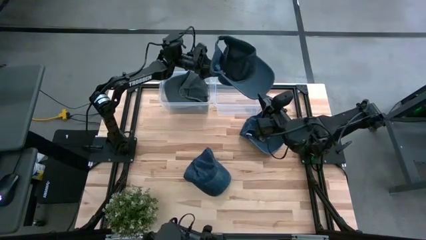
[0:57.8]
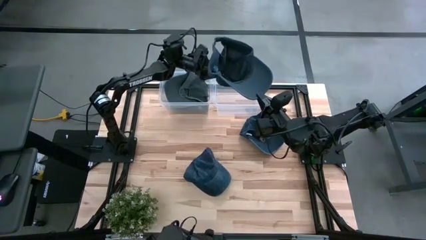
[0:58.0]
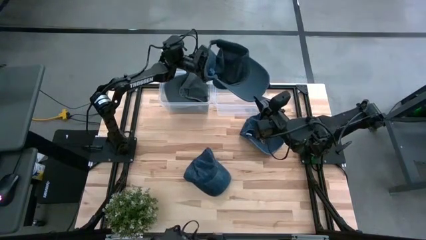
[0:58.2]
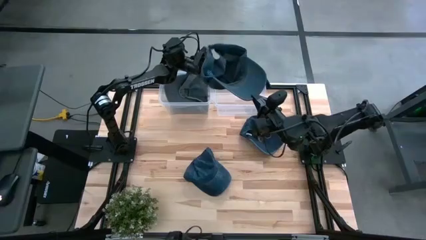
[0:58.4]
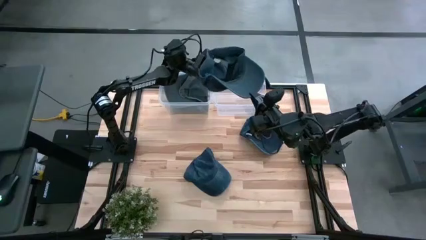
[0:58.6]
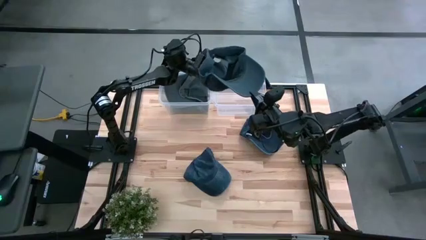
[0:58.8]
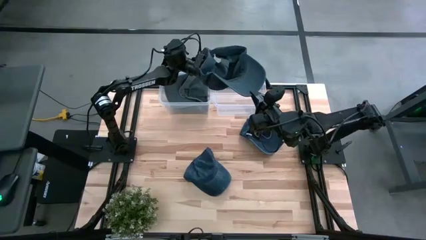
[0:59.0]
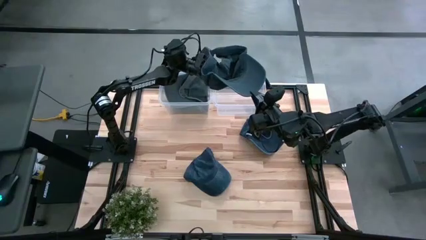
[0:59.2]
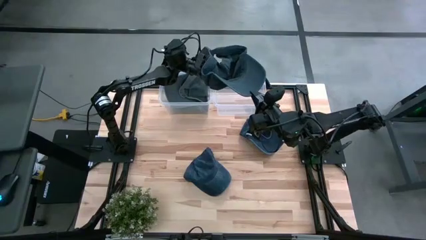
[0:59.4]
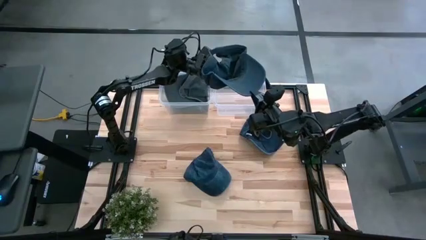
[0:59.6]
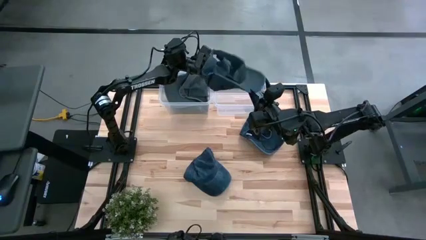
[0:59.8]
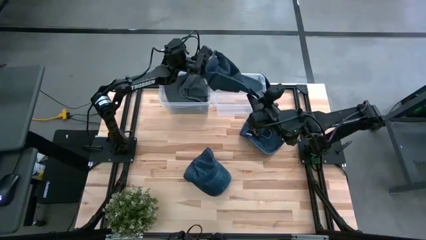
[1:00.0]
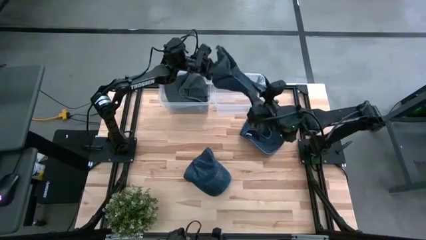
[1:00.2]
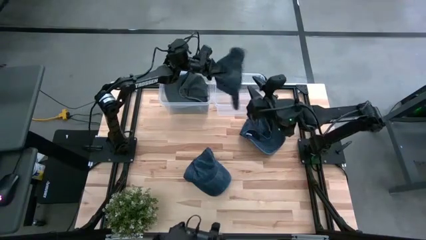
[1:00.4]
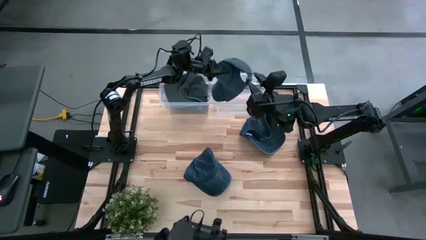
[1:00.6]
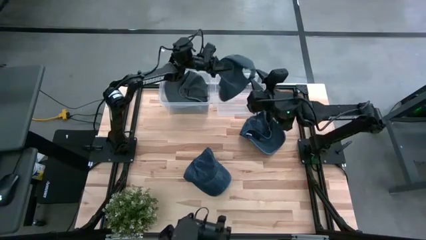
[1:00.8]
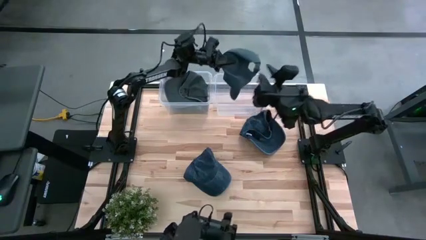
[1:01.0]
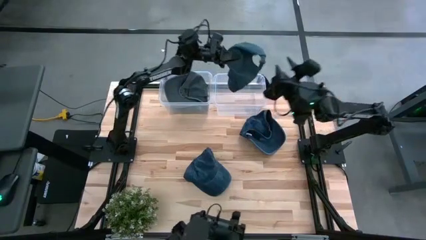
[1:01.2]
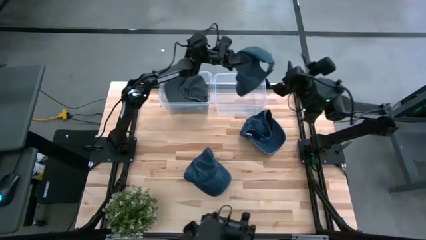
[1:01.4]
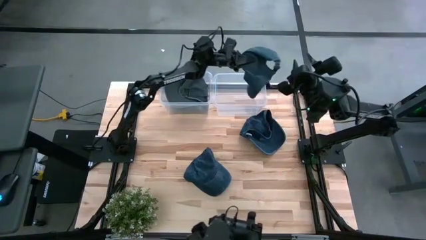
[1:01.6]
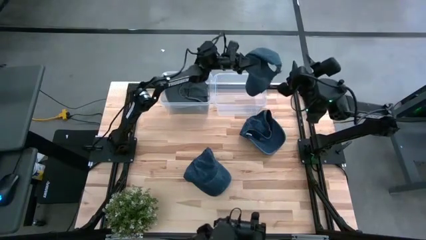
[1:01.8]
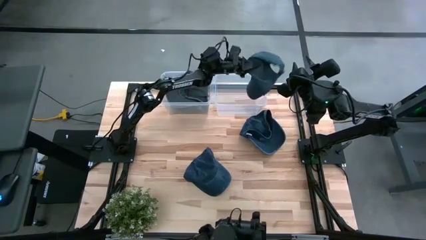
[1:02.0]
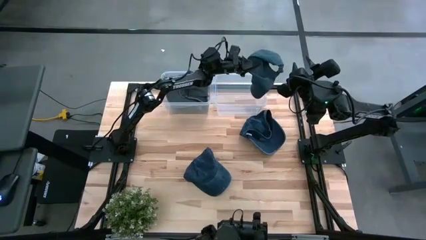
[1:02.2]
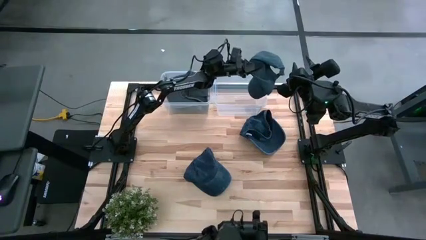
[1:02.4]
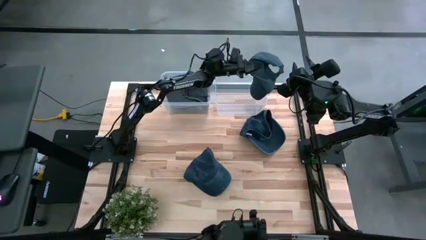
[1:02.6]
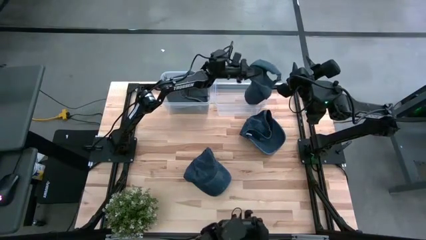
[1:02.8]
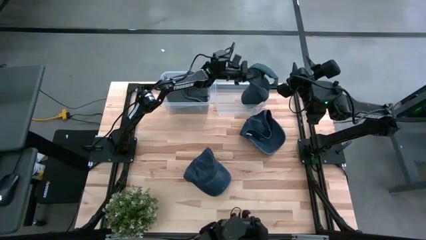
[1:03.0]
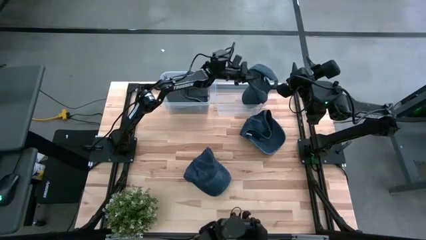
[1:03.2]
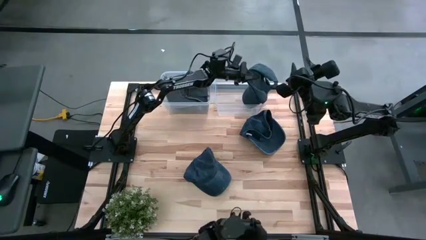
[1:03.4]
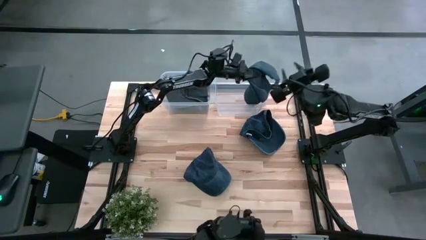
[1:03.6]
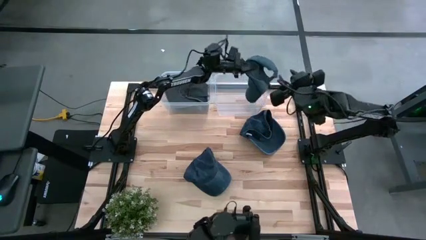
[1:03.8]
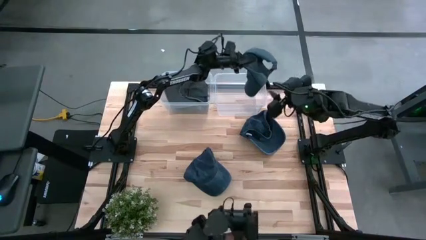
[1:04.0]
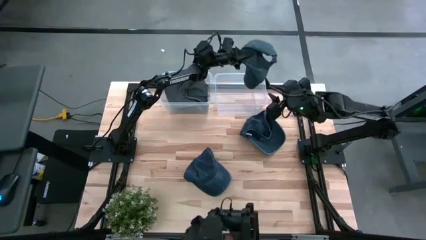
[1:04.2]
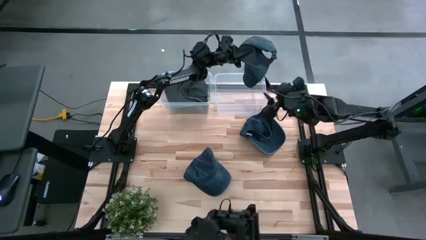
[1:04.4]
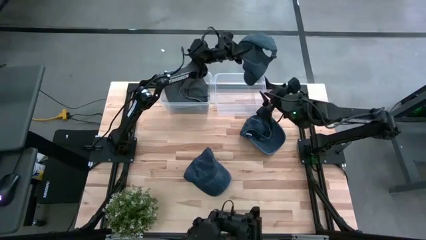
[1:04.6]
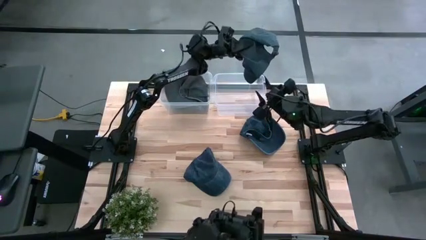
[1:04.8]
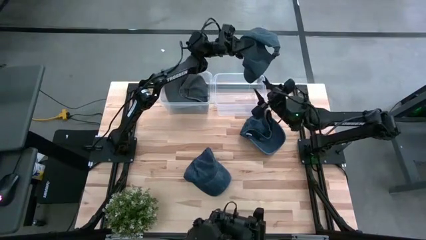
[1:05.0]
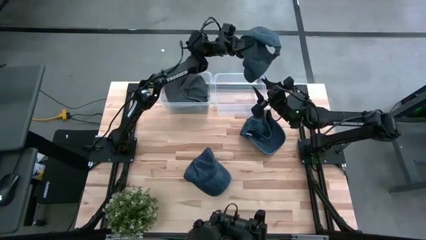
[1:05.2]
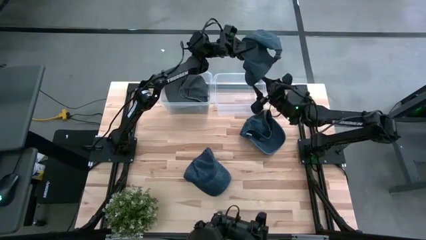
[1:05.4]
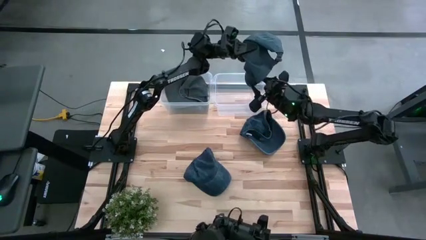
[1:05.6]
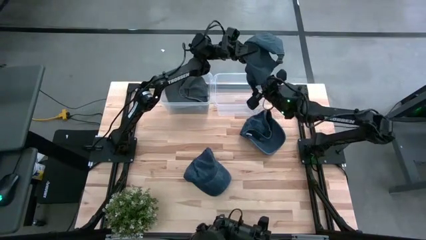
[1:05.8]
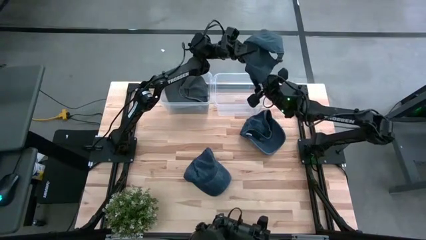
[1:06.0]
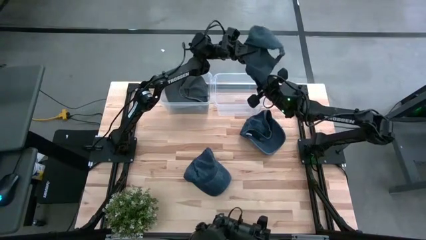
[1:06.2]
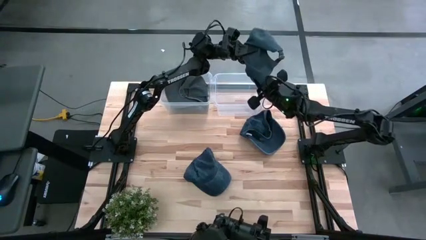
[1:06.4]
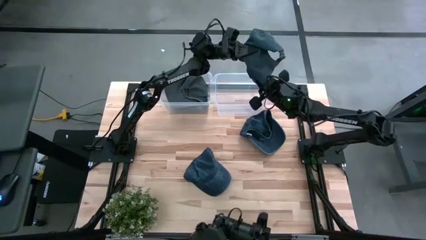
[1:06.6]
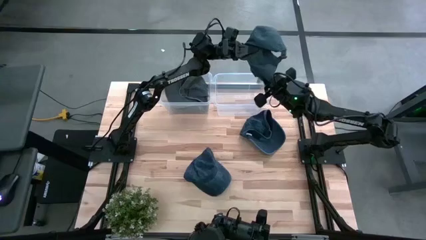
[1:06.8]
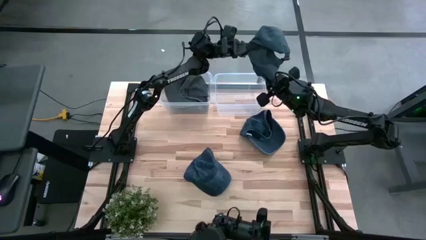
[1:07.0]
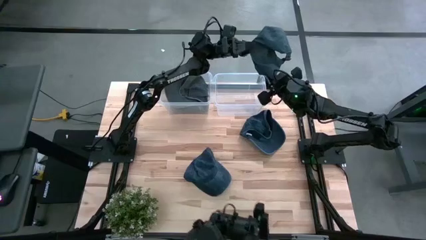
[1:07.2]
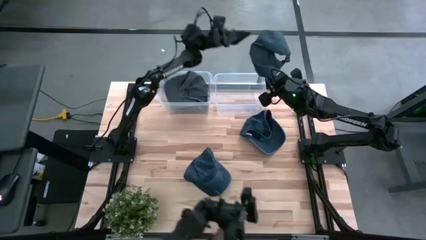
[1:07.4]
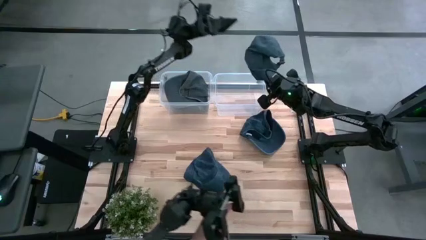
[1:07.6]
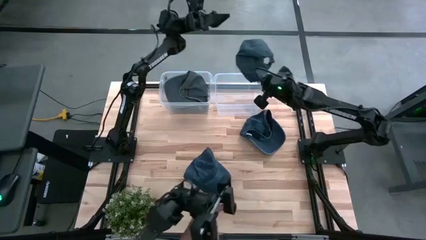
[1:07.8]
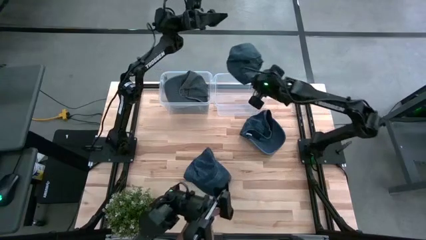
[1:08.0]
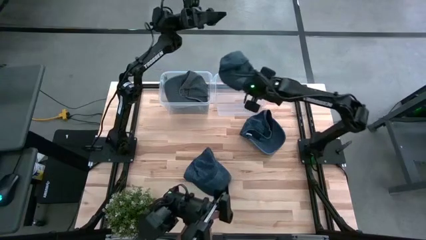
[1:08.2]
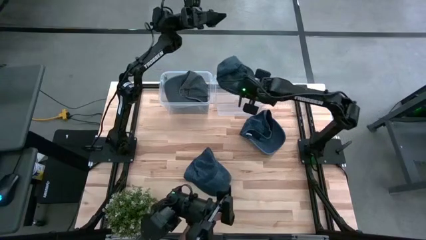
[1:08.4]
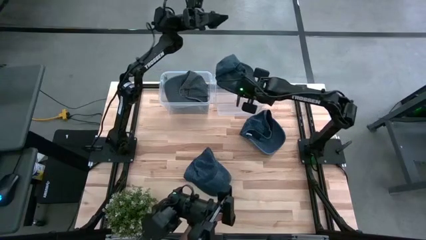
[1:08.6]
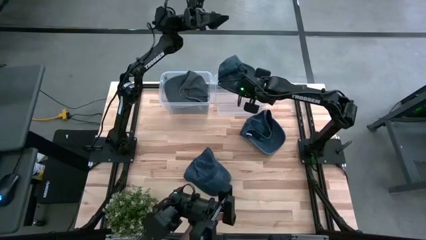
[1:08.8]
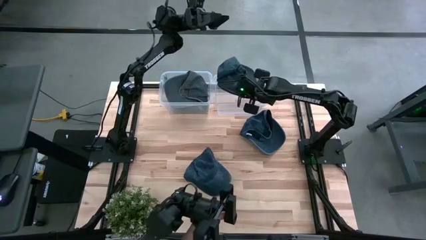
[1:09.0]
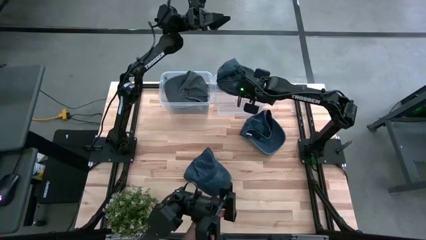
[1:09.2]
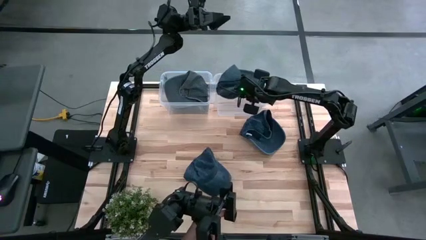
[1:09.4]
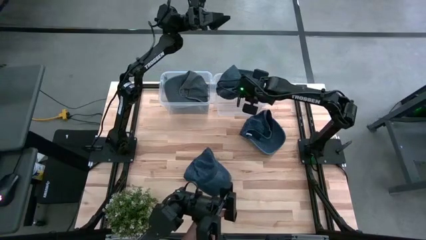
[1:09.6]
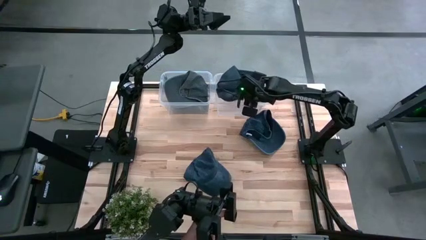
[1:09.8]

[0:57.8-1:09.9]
Task: Pick & Place hat
Put the top left blue cap into the right transparent bin

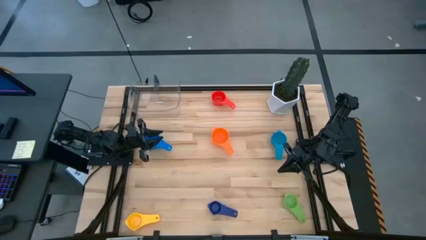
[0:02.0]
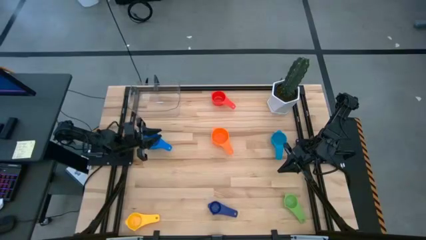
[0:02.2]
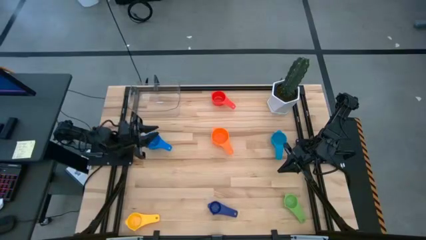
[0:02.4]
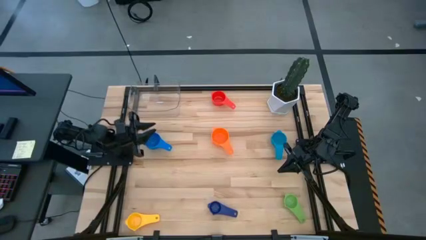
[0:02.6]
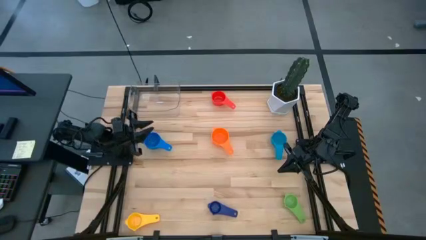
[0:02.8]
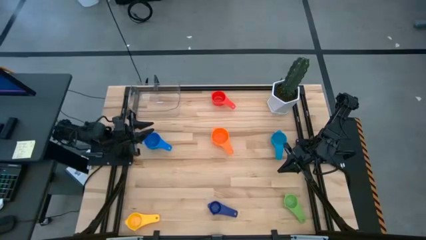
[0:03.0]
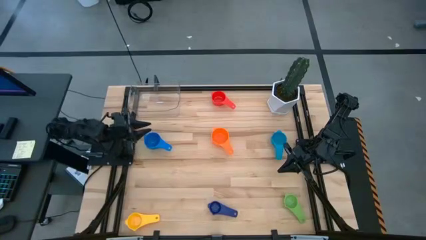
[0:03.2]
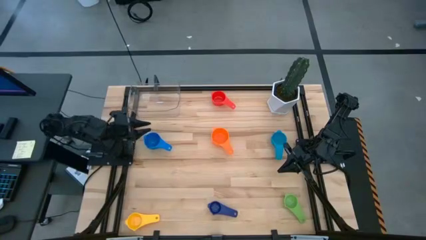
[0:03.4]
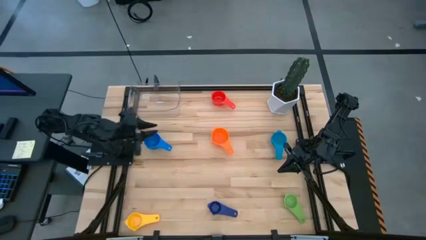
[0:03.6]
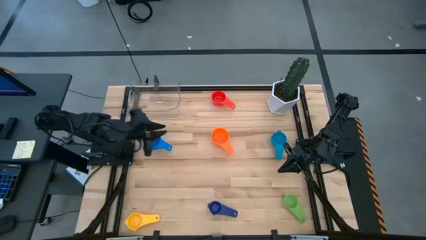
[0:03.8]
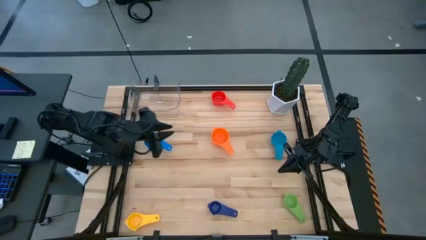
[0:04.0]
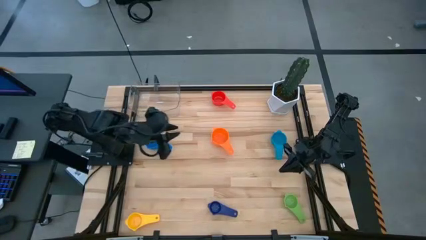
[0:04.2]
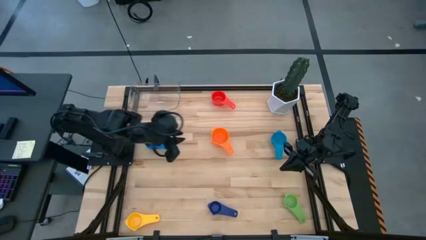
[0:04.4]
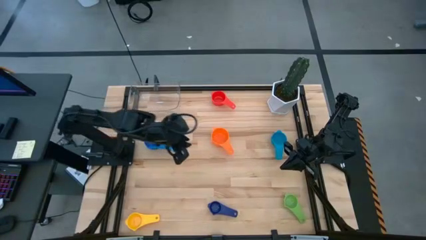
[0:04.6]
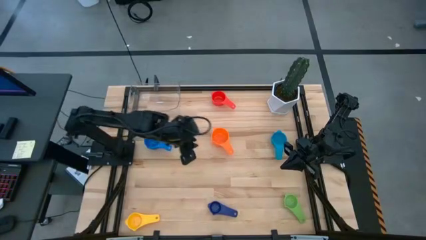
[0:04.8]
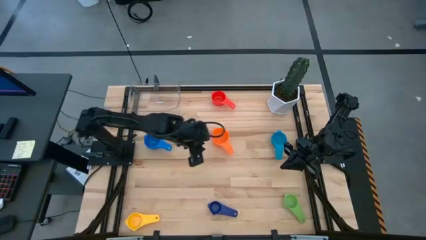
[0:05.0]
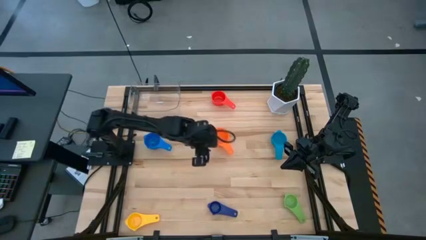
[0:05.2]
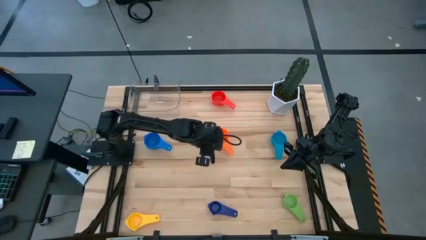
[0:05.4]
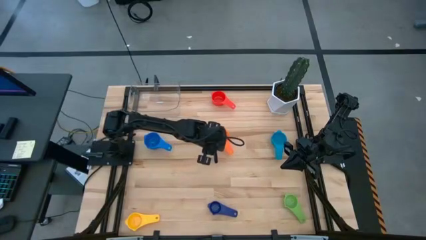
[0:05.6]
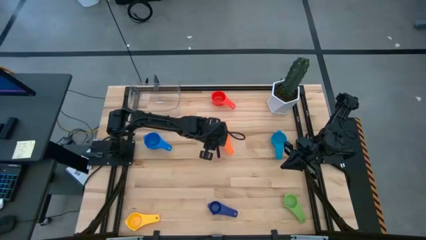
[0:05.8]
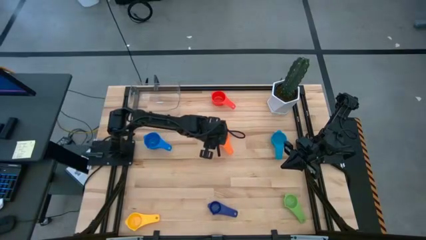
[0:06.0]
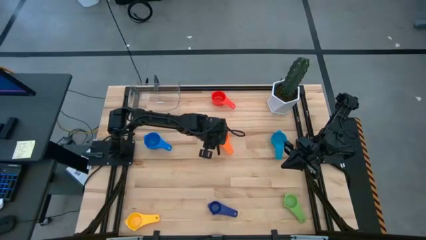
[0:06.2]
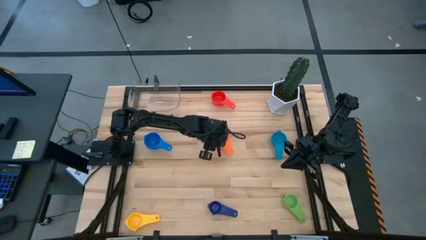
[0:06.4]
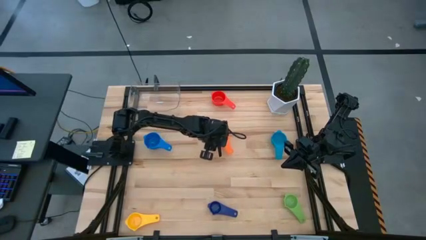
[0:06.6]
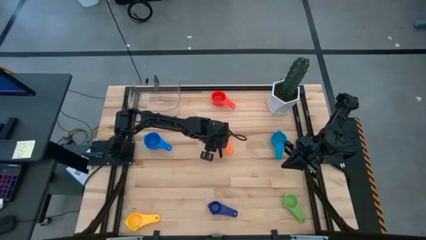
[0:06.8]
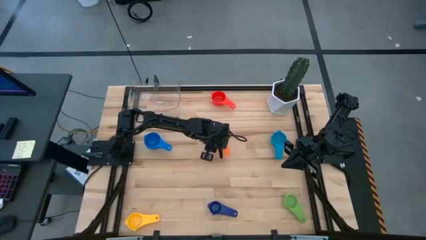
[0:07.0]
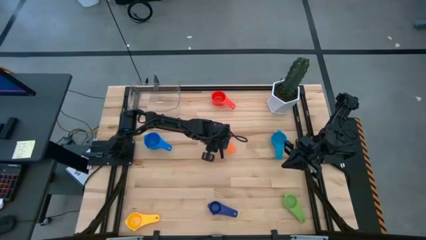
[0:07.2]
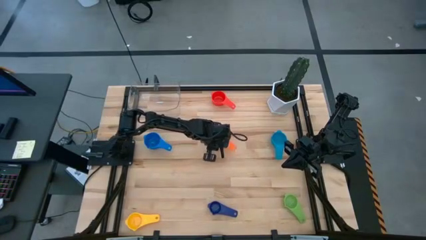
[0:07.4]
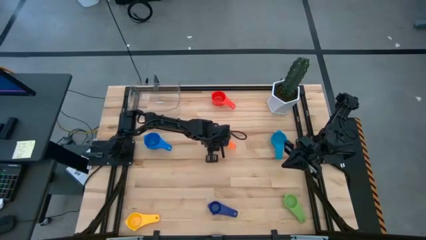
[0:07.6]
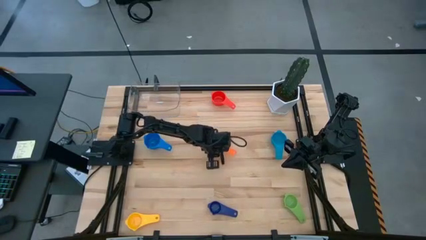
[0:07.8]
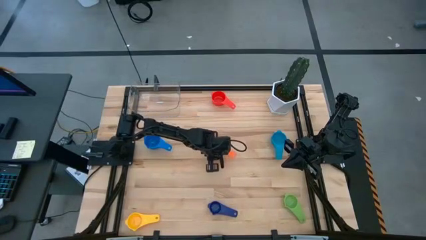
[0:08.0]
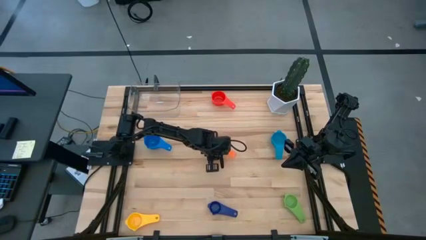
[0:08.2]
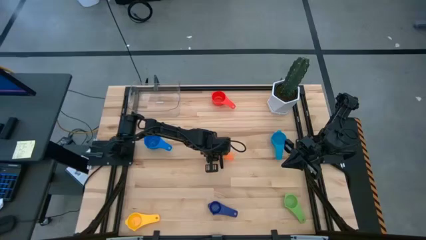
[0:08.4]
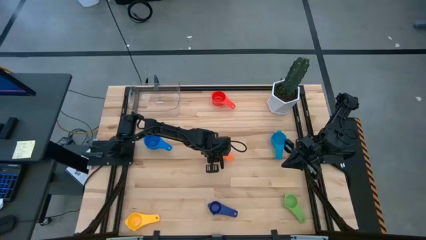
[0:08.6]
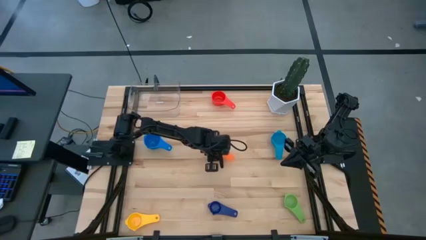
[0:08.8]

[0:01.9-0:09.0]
Task: Nest measuring cups in basket
Adjust the orange nest measuring cup
